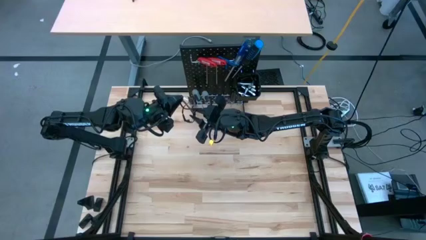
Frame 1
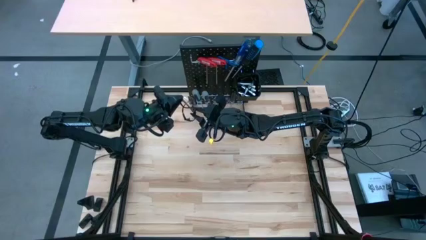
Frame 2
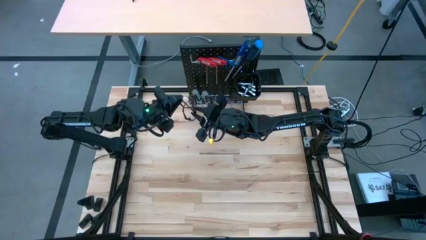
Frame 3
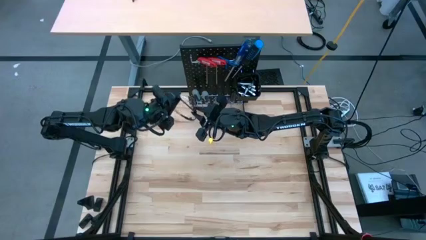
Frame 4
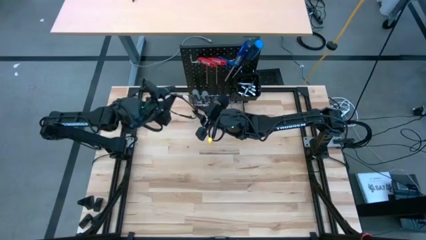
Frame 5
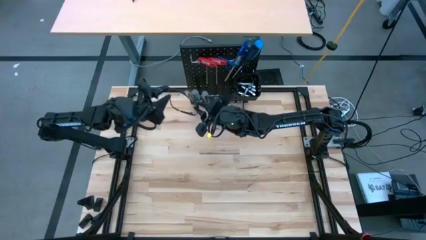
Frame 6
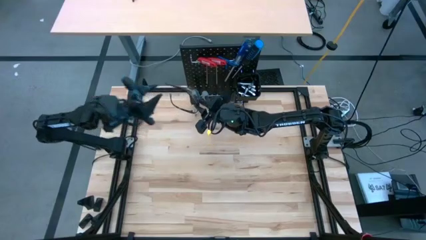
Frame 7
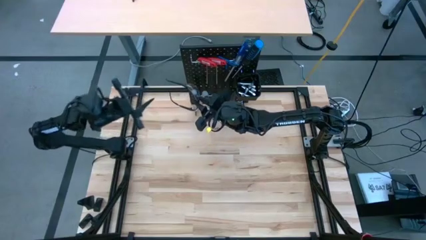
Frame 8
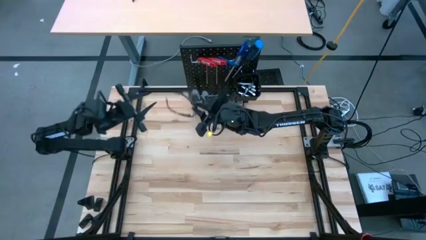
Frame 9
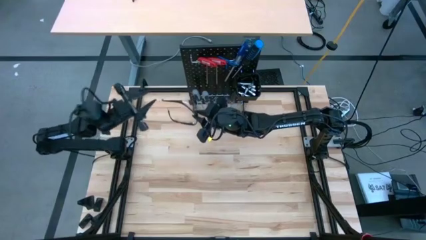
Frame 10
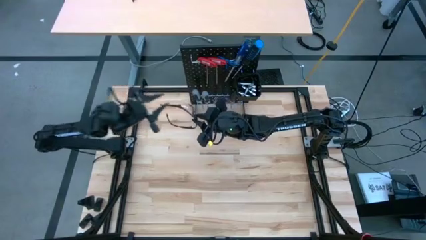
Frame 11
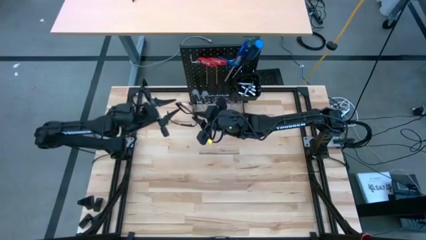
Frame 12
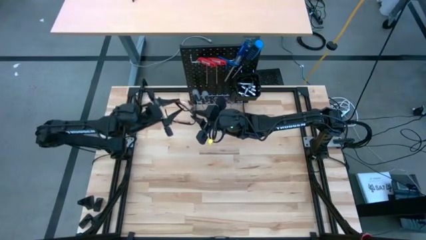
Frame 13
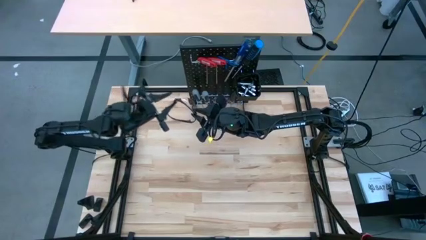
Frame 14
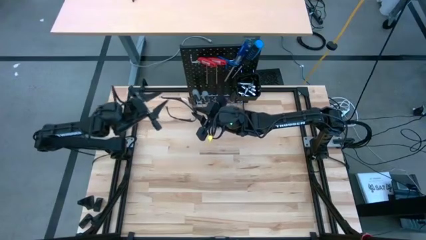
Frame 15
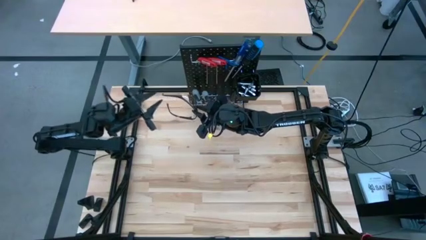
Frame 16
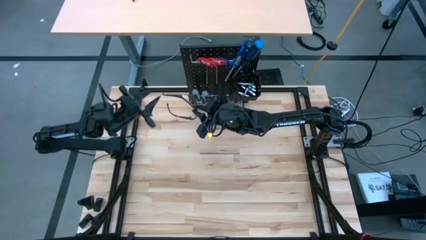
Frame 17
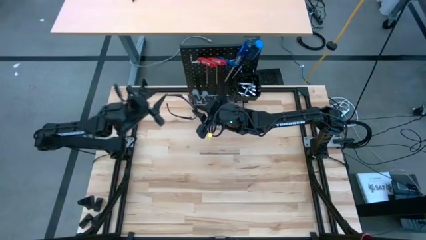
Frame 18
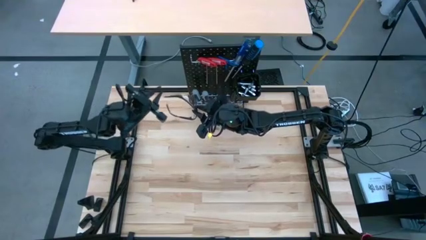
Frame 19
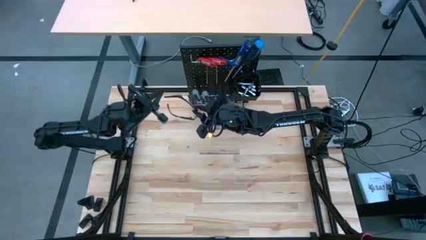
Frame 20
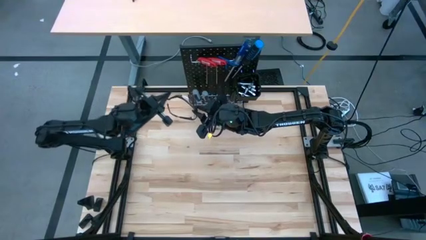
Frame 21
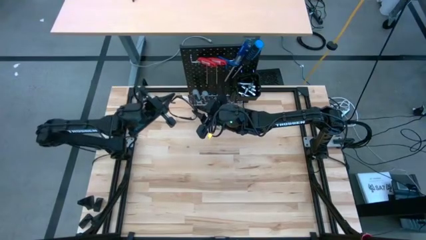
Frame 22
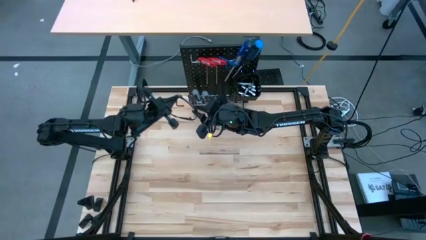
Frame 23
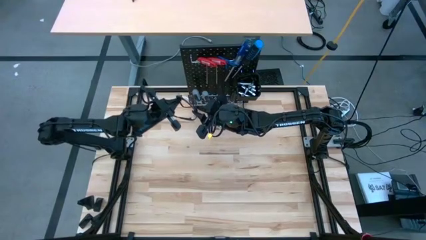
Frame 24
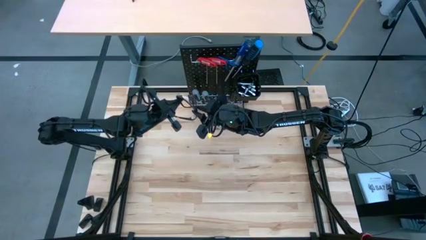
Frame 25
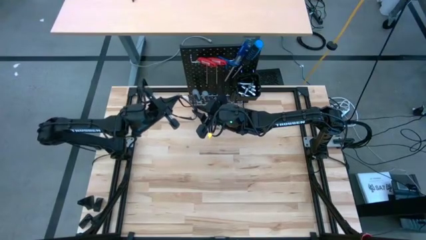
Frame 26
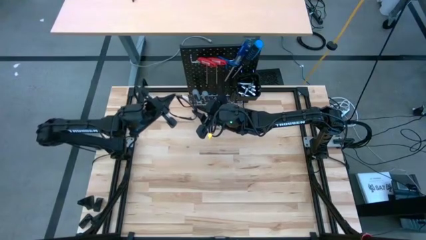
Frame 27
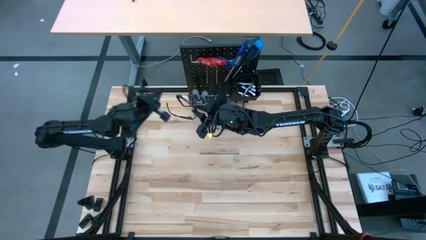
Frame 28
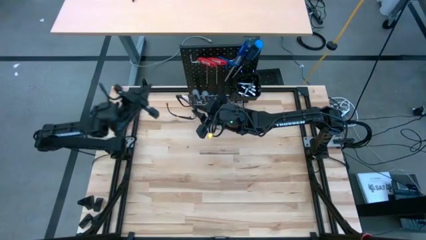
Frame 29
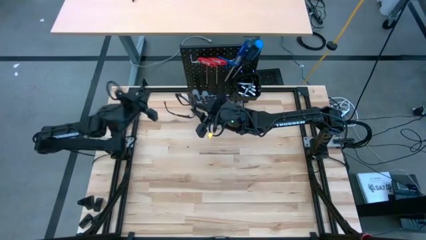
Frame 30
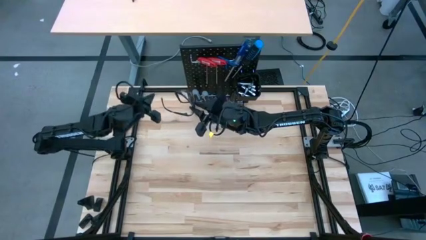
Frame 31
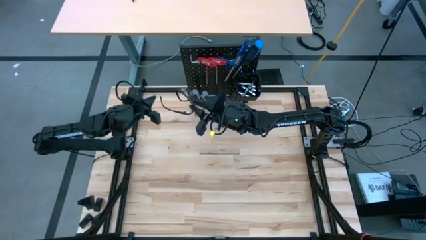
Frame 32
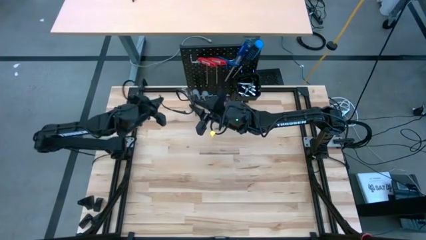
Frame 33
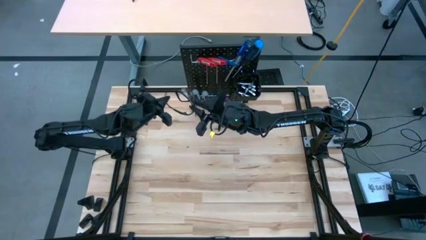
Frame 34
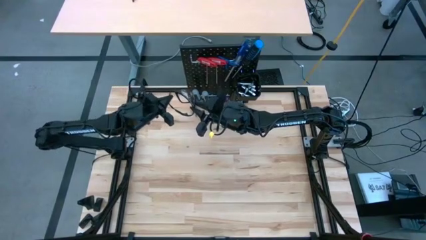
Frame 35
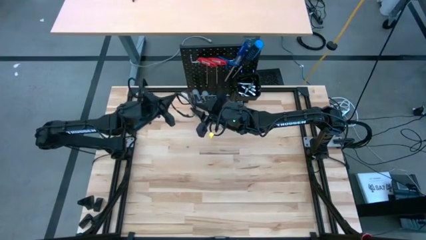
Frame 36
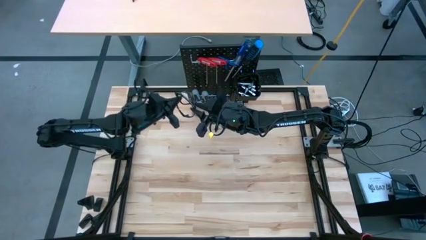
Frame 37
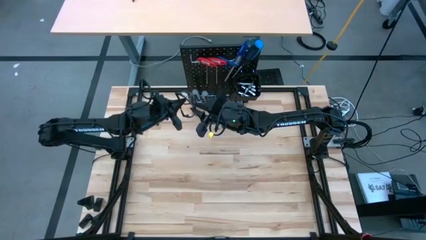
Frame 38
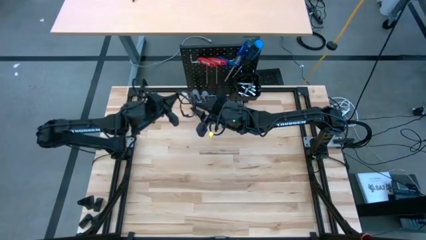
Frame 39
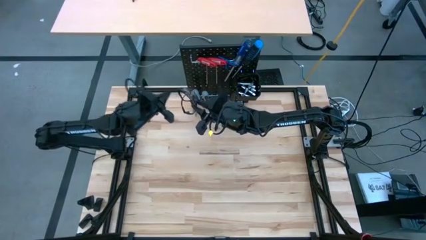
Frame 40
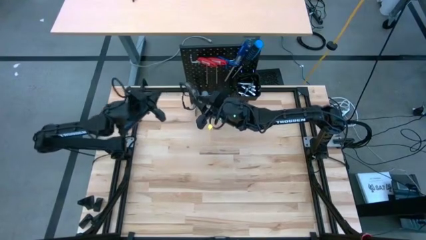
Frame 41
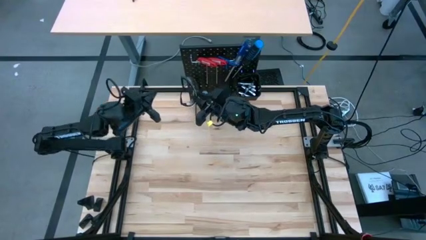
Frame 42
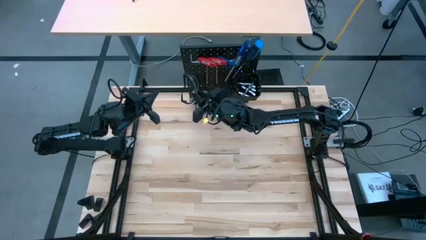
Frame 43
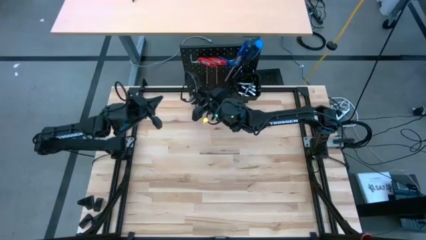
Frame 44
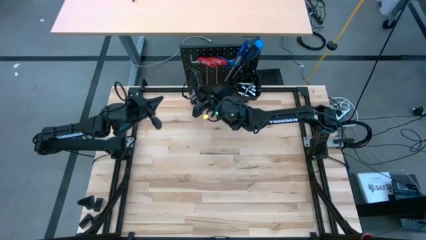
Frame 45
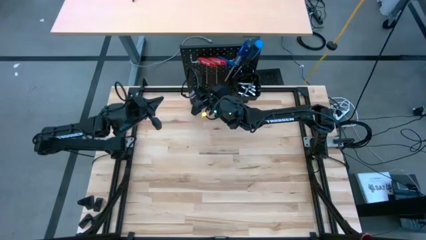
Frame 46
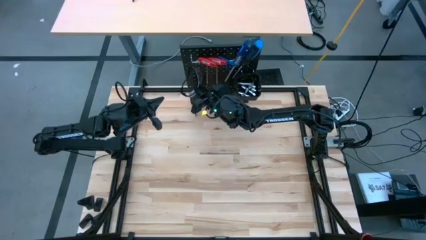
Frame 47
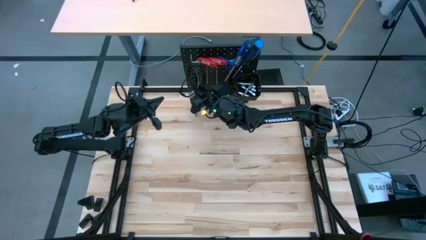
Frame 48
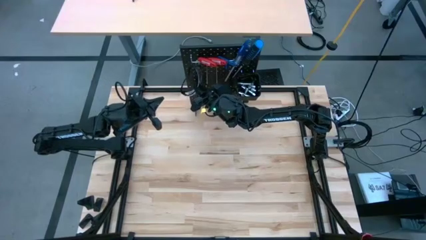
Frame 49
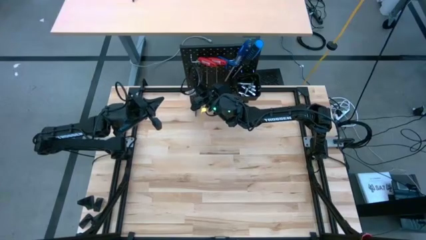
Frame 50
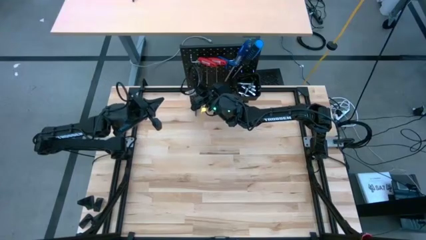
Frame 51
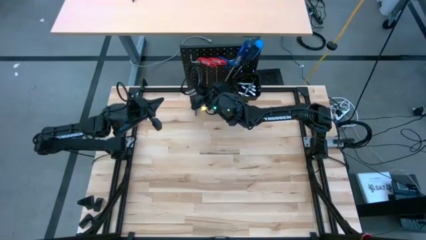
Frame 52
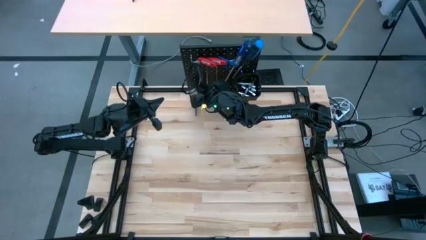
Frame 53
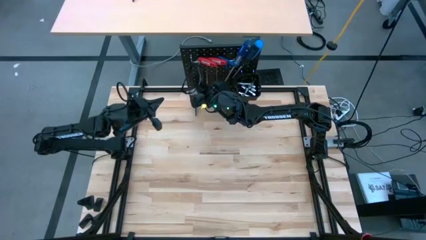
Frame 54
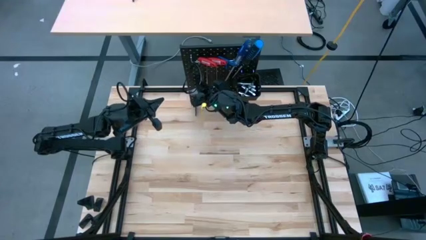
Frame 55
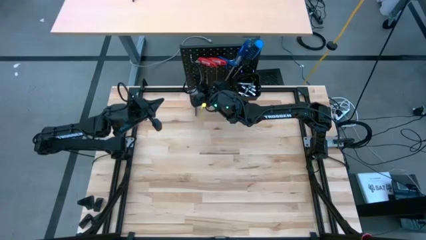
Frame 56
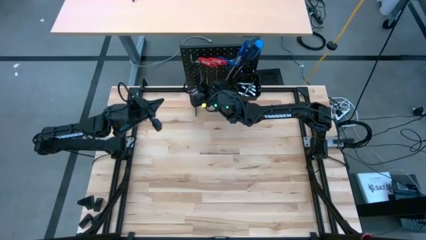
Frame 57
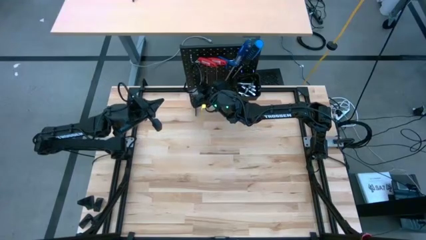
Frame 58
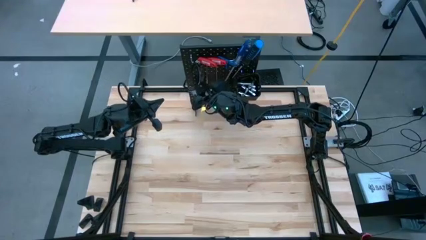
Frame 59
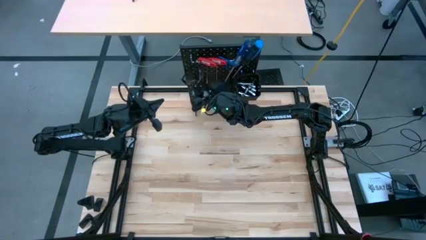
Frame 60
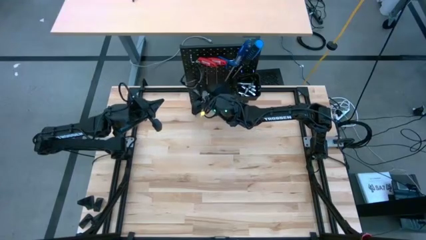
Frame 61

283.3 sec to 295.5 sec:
Task: Hang tools onto peg board
Hang the safety glasses on the pegboard

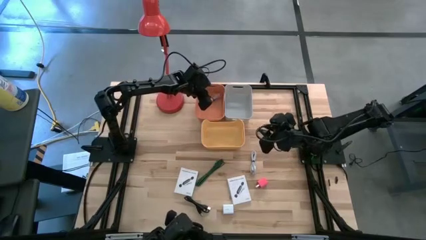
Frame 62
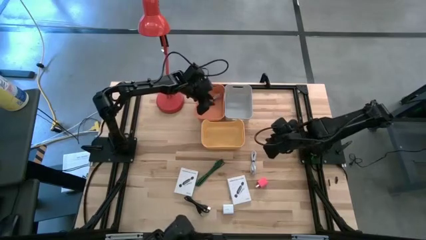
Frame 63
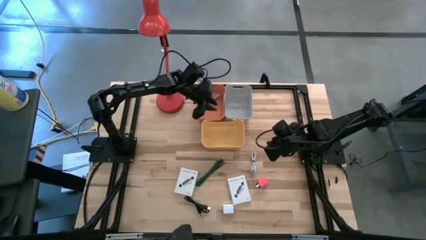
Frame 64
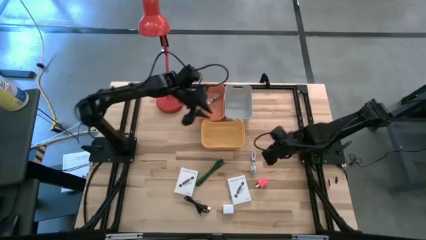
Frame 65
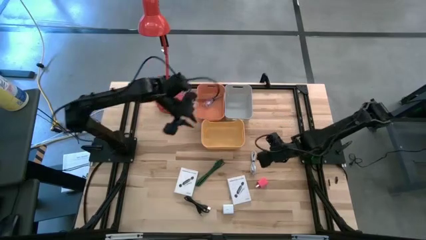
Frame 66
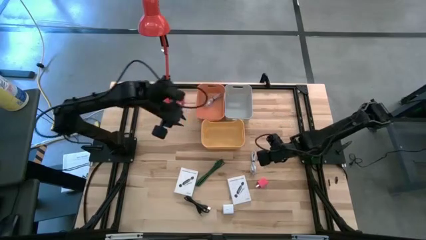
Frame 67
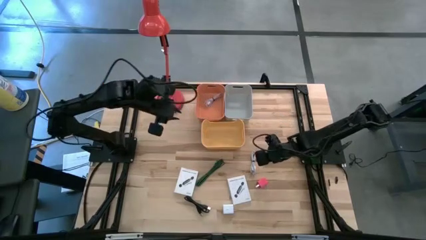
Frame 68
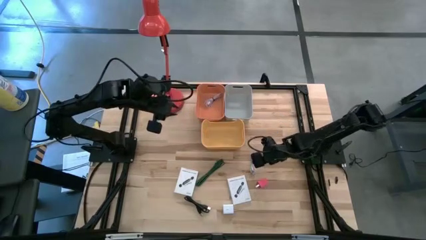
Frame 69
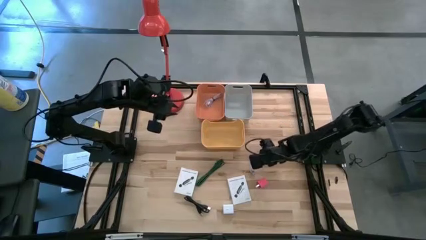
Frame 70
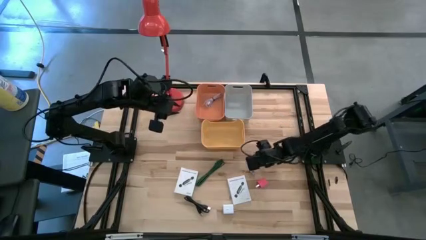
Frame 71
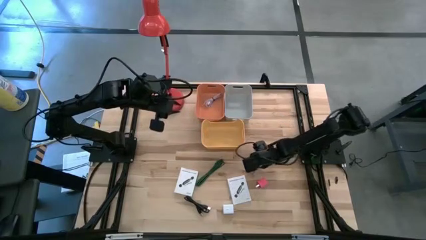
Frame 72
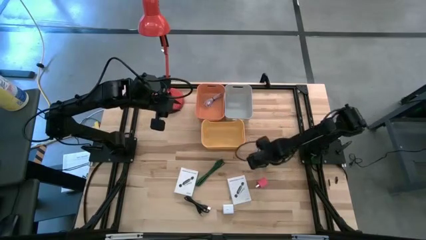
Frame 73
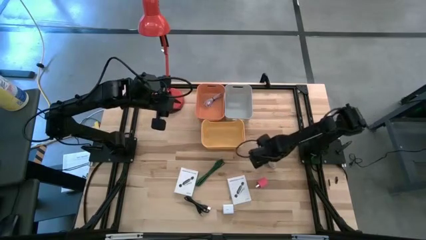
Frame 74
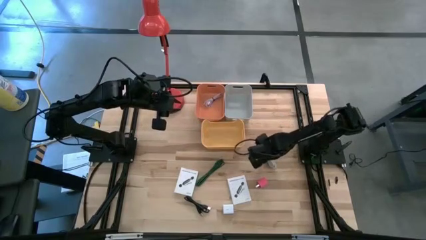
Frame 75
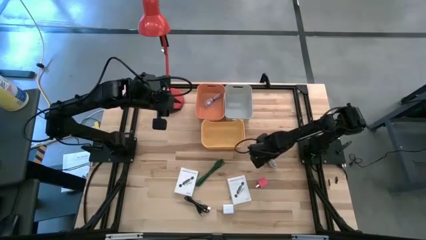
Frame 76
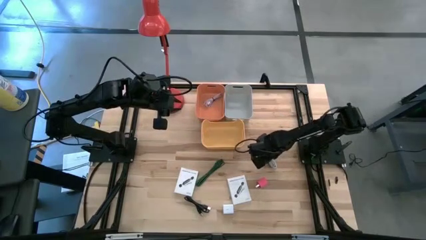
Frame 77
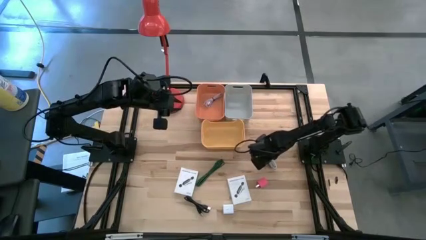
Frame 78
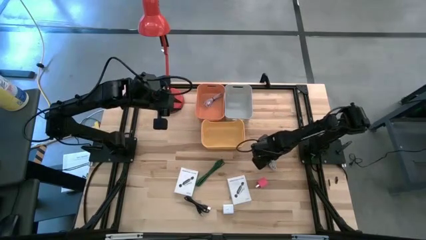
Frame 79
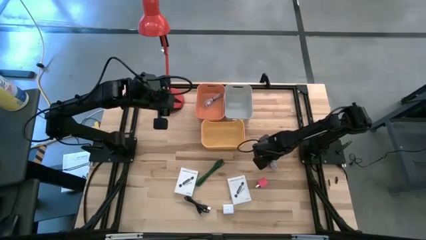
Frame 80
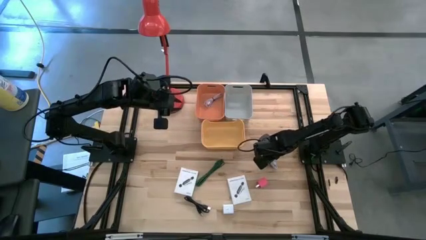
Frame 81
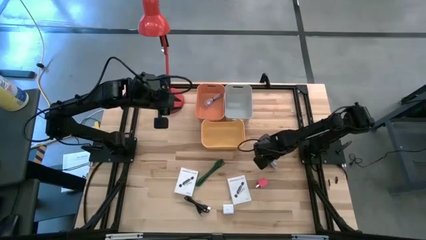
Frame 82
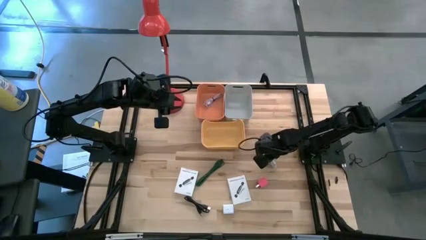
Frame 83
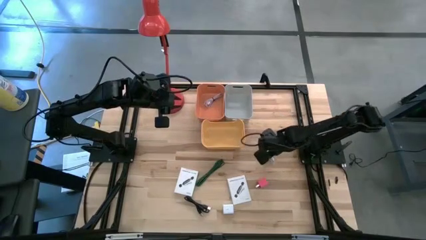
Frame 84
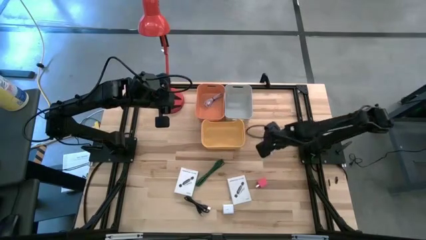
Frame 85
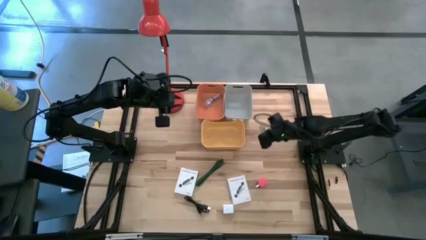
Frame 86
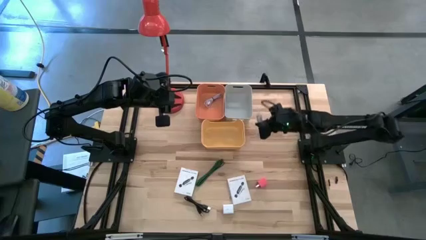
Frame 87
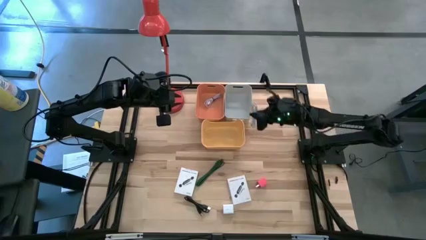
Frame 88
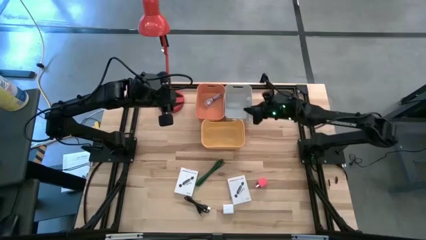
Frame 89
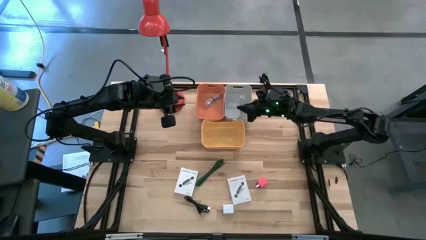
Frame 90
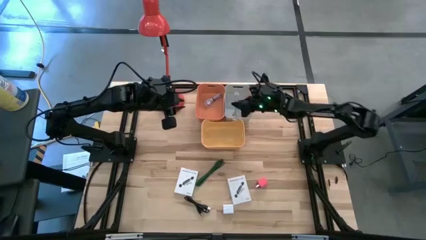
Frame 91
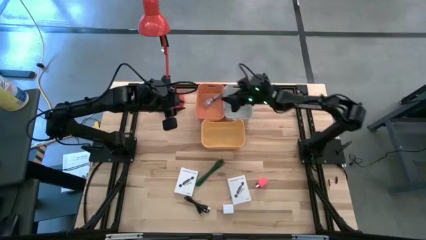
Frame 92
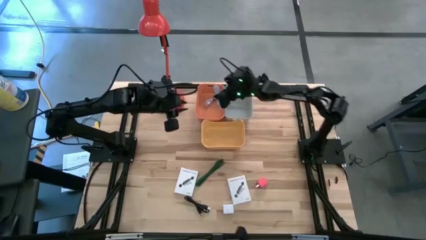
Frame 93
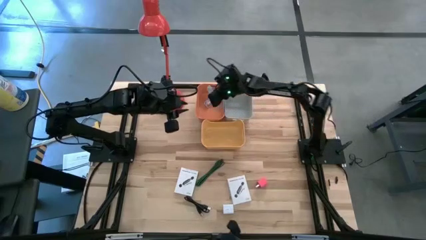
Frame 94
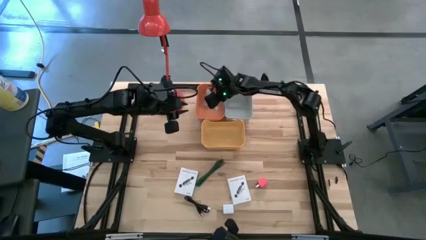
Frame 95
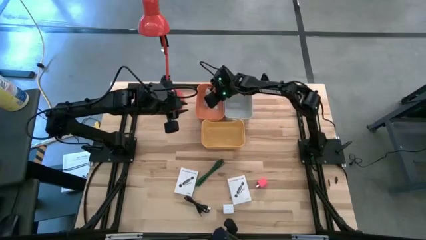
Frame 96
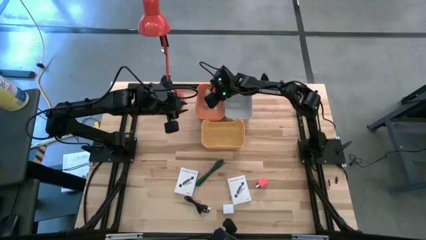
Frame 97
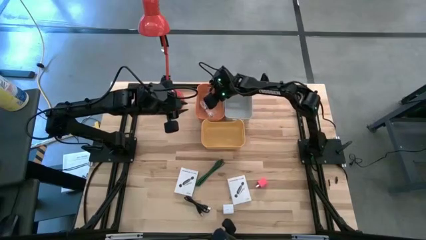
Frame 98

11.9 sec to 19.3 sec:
Task: Pick and place items into bin
Put the white charger cable into the orange bin
